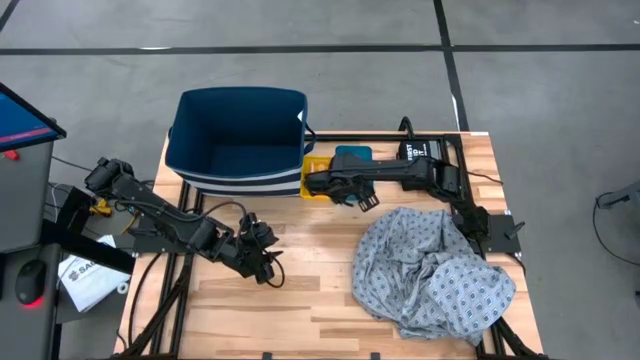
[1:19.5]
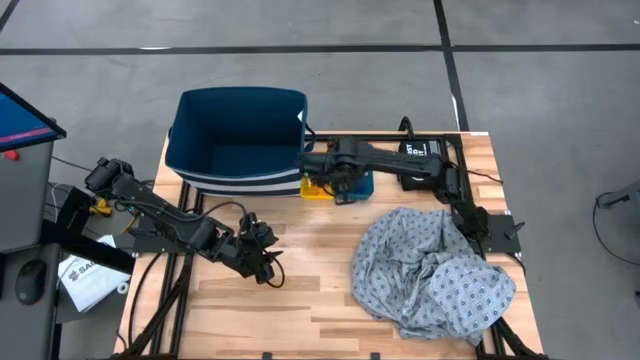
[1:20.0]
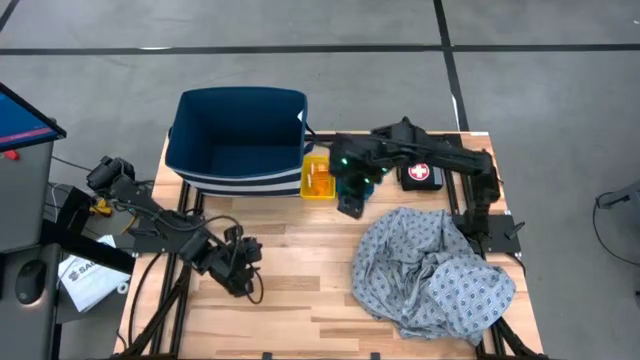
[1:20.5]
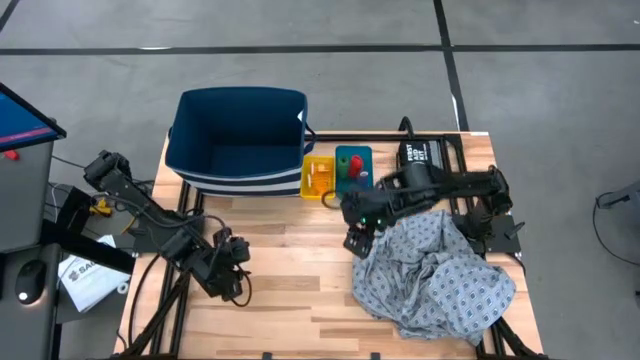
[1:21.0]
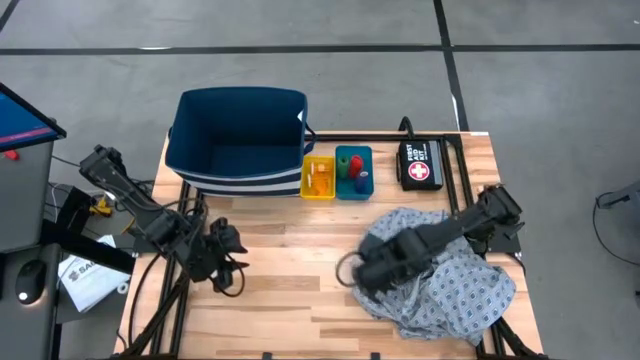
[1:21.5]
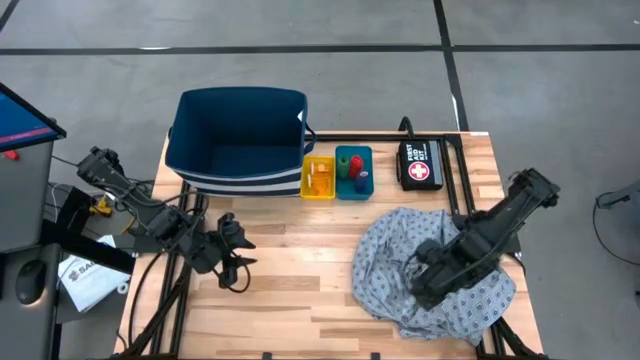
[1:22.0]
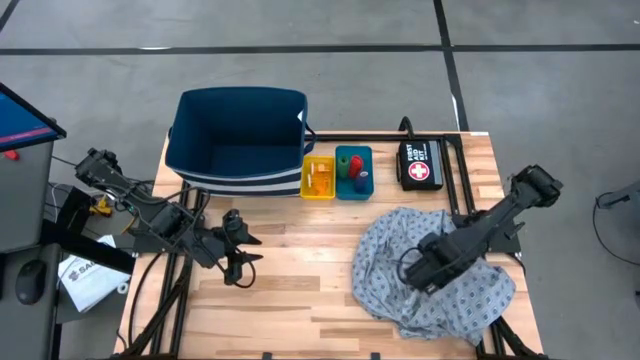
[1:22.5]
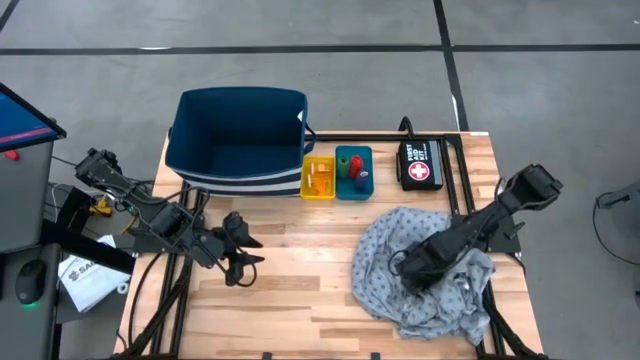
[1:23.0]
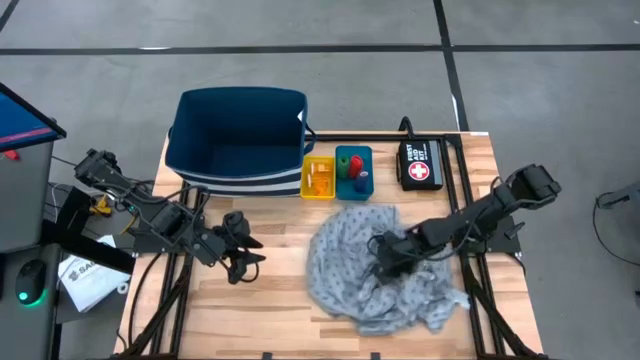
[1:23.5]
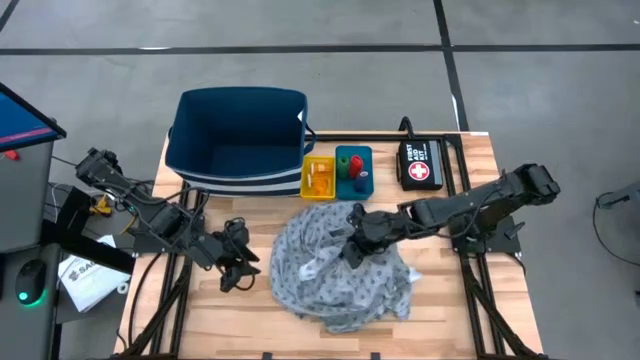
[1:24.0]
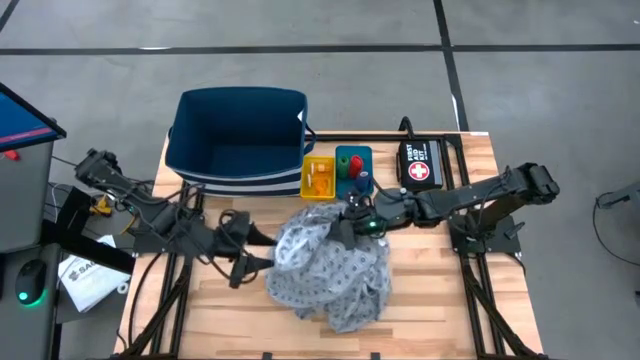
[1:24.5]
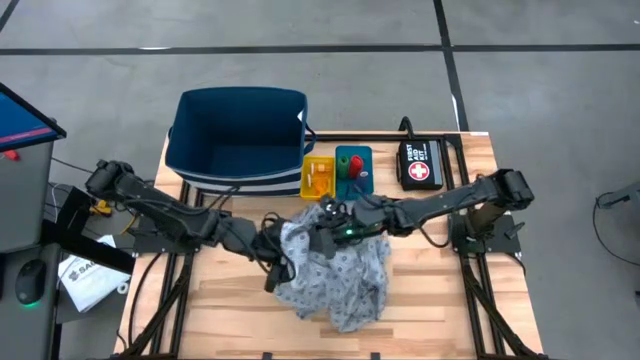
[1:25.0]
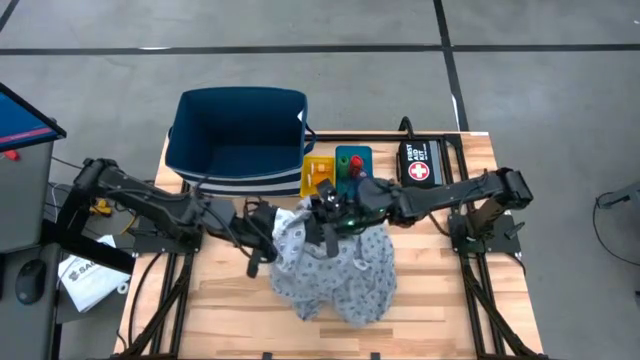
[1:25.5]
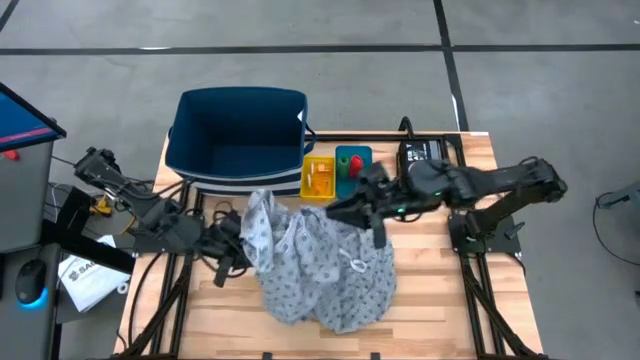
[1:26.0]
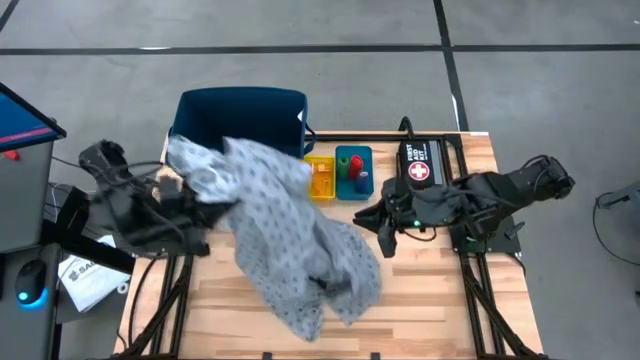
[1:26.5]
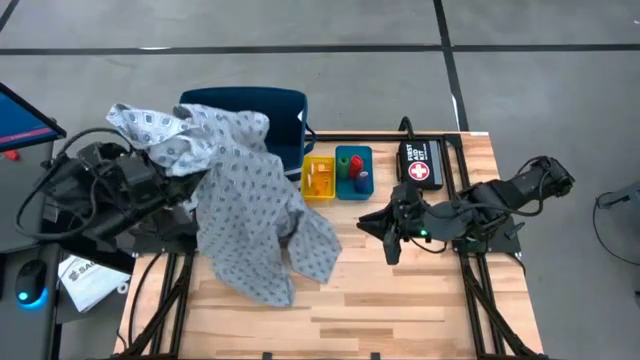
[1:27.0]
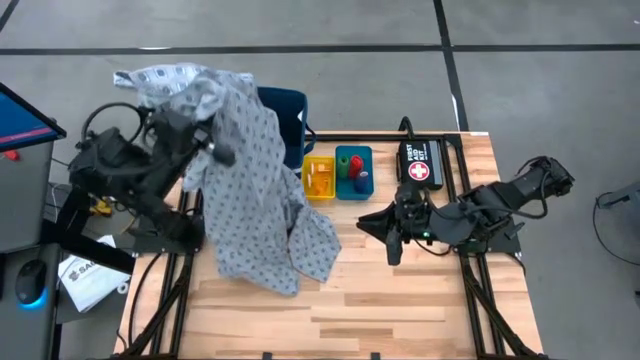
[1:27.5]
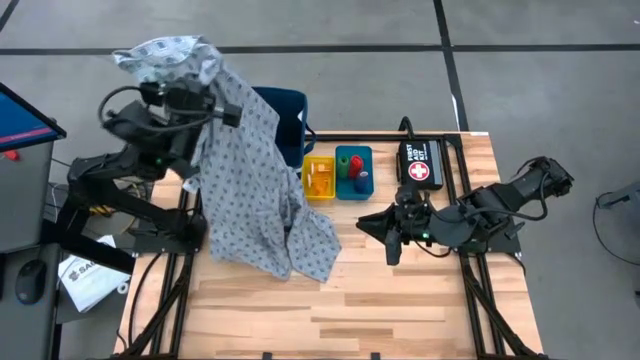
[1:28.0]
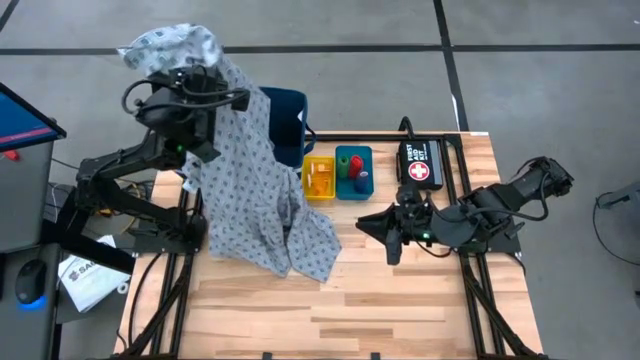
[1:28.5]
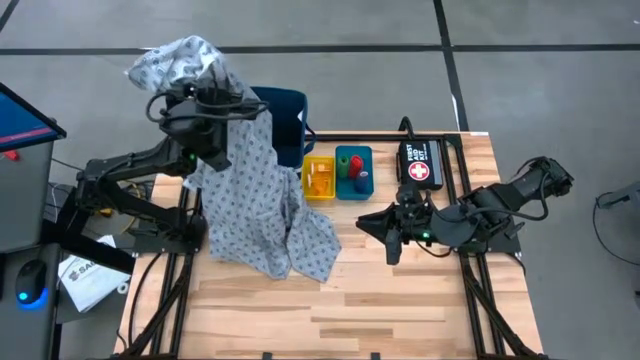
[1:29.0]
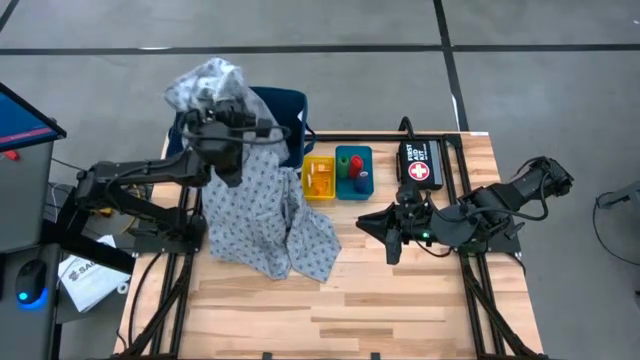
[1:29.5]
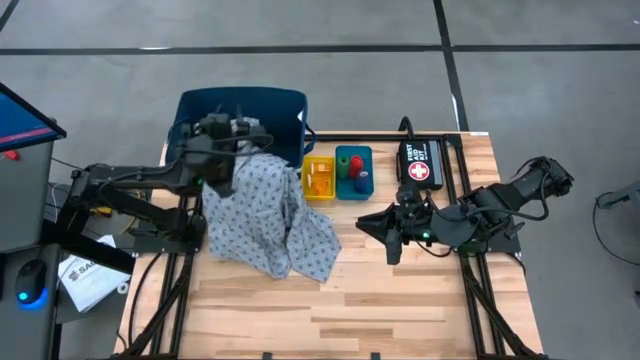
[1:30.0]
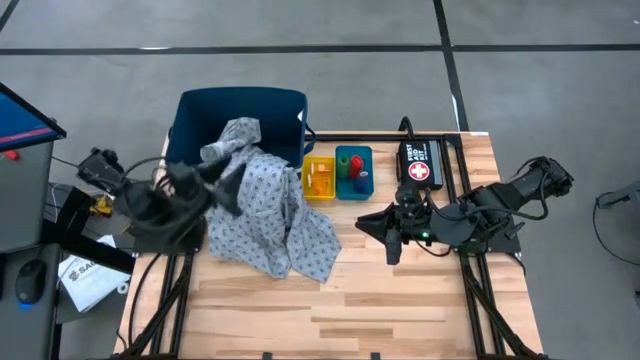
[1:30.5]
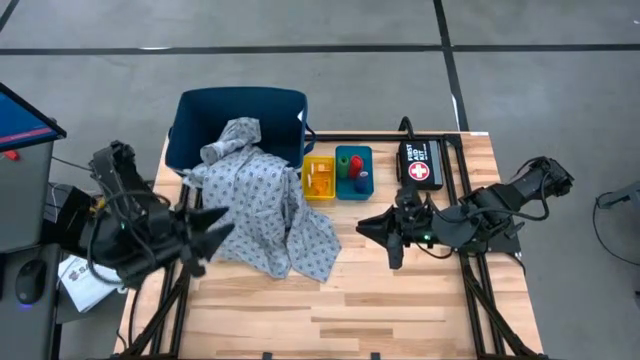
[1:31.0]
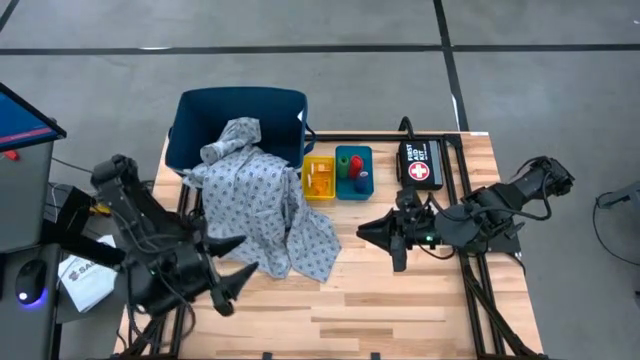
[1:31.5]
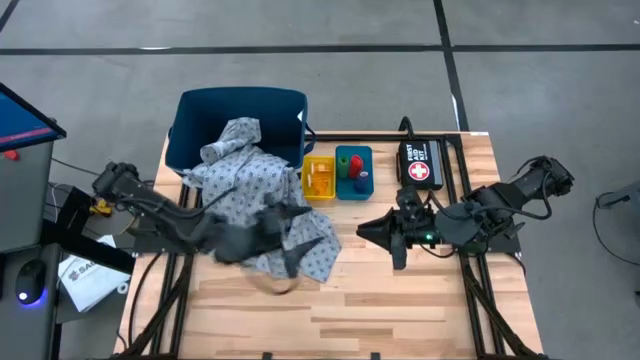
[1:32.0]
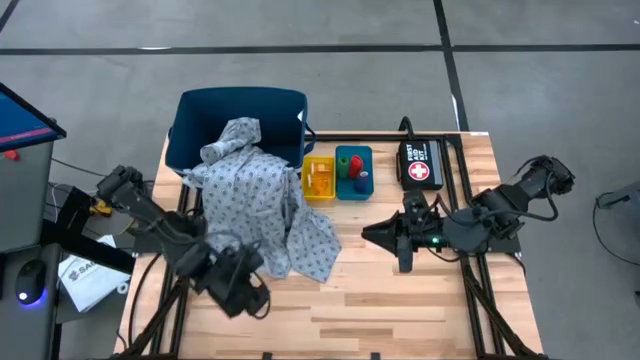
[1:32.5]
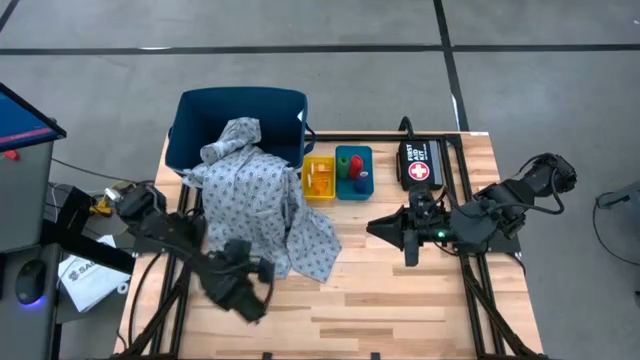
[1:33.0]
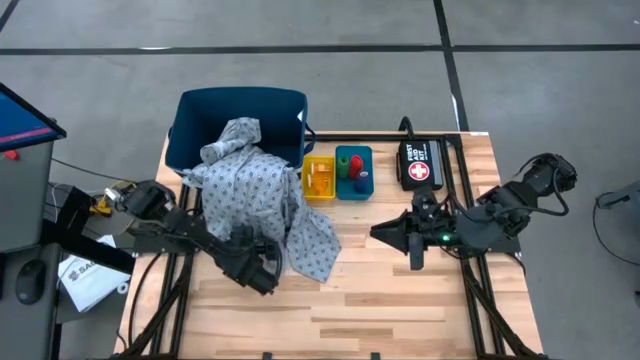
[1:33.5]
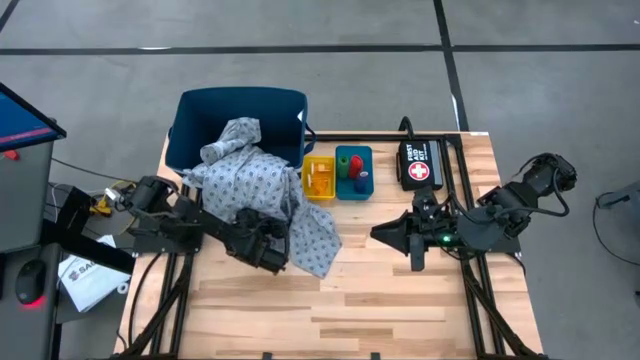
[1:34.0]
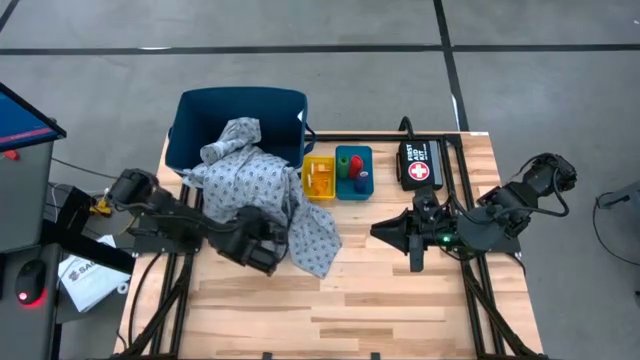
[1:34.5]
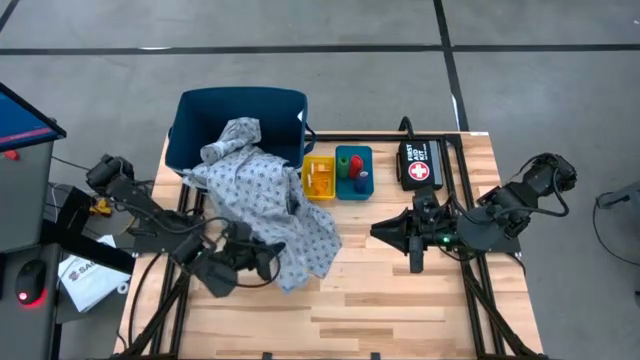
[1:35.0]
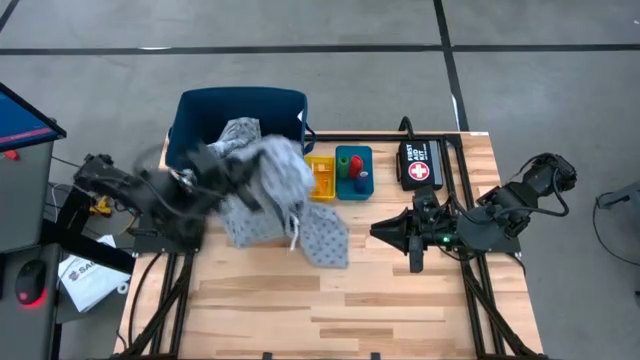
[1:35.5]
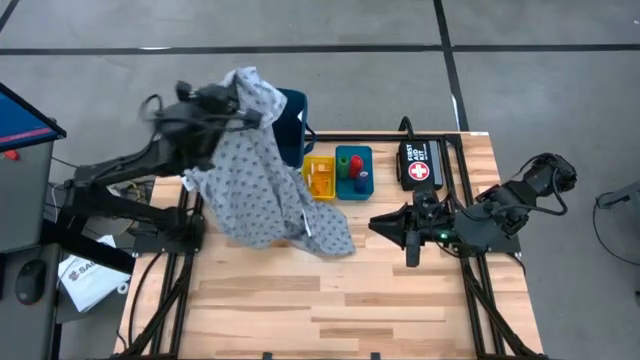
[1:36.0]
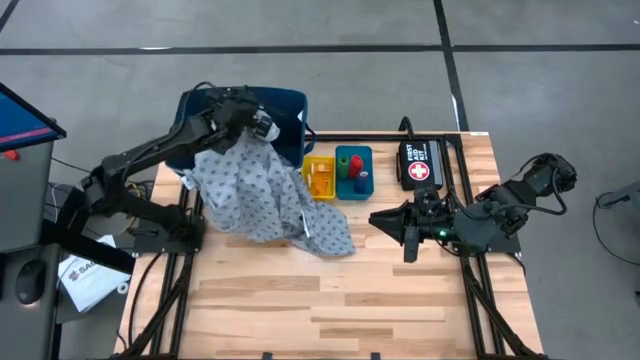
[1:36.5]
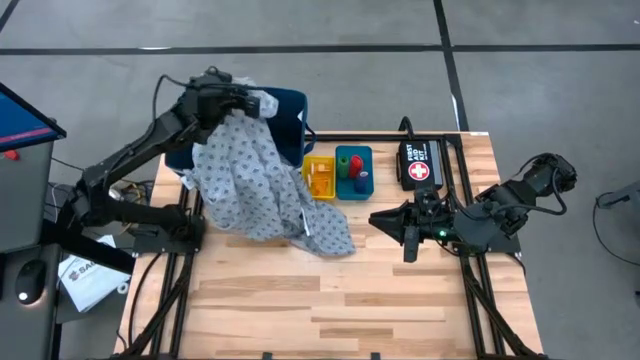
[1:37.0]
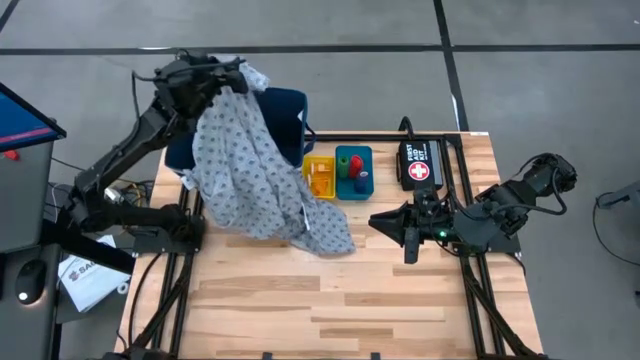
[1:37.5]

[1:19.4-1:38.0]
Task: Pick & place medical supplies in basket/bin
Put the blue patient gown into the left blue bin

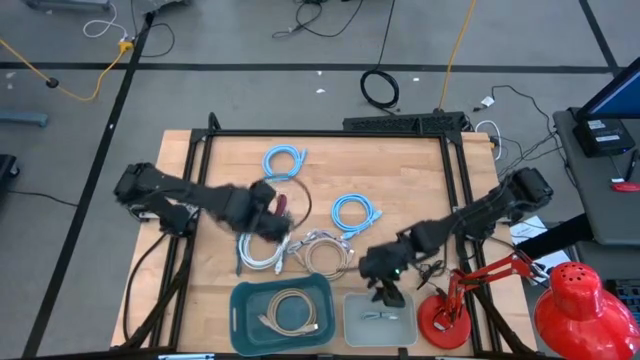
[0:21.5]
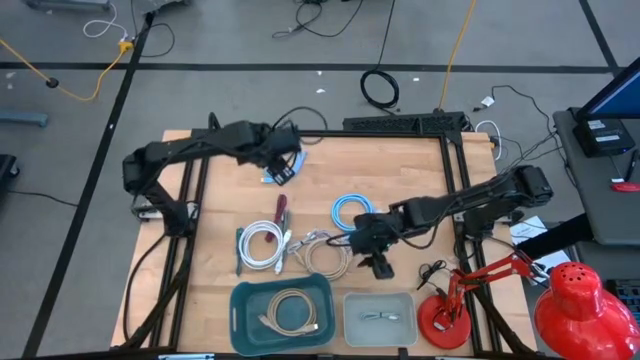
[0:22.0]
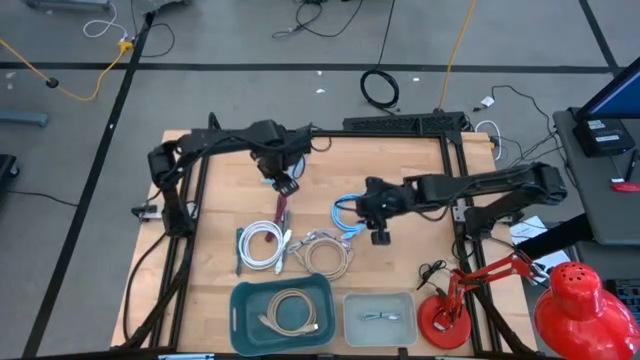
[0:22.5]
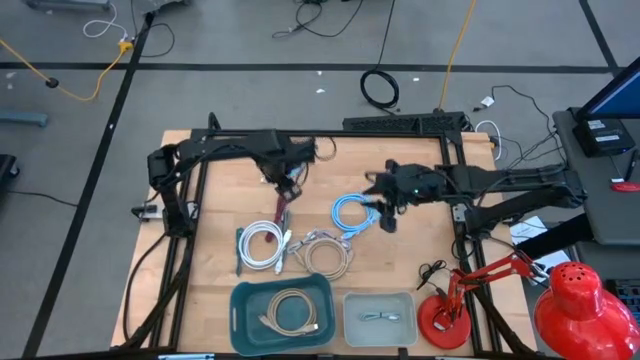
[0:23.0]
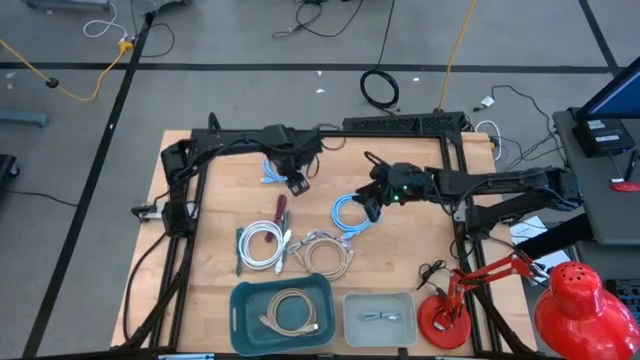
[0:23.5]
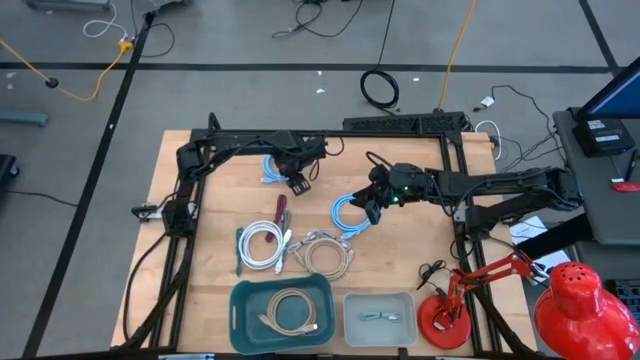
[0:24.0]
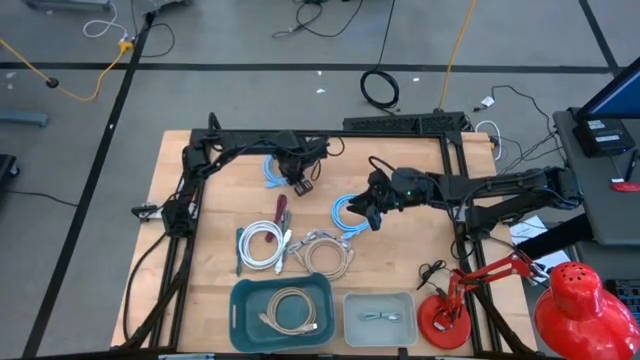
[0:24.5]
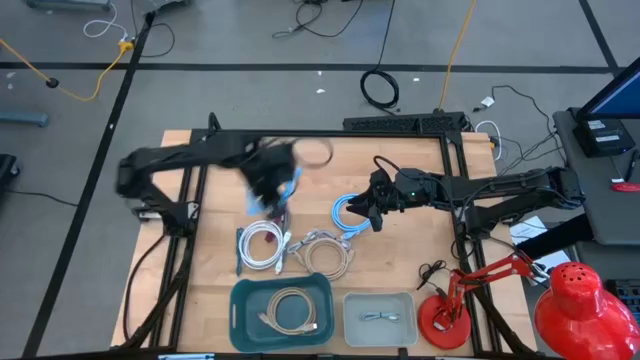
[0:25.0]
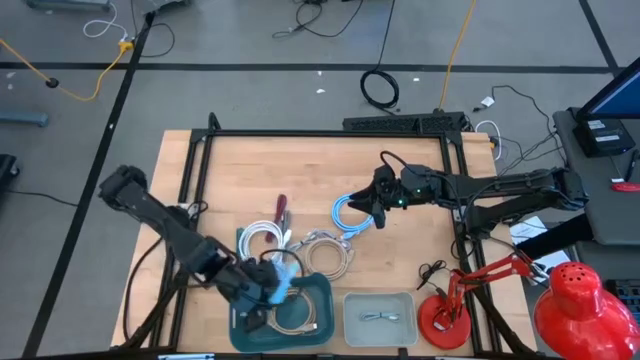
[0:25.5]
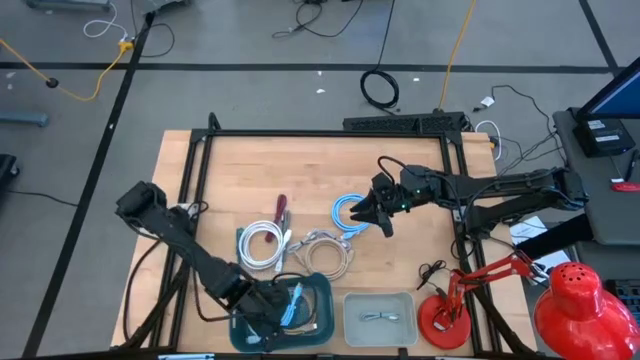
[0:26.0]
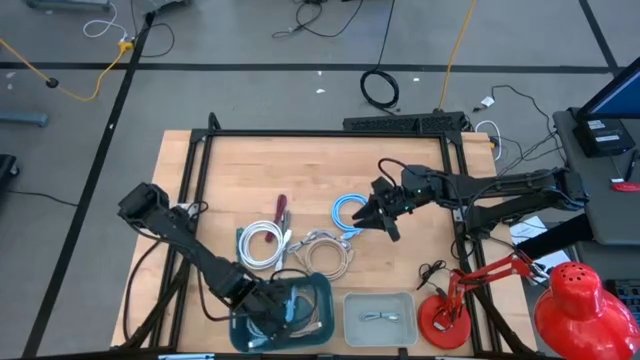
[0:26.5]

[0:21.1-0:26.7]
Task: Pick & Place USB Port
Put the top large blue charger cable into the dark blue bin
